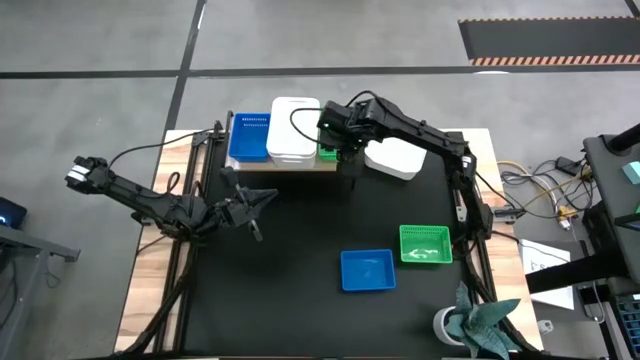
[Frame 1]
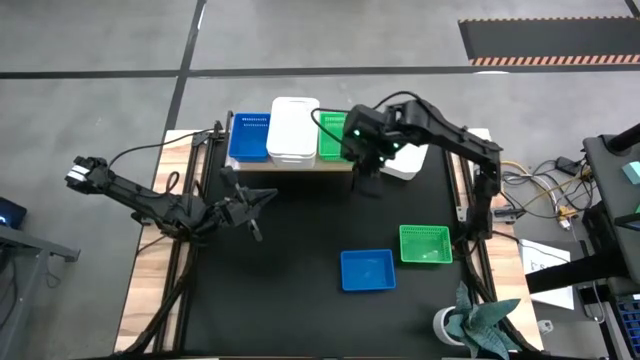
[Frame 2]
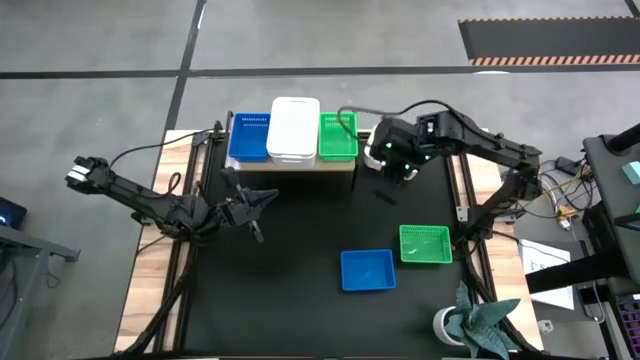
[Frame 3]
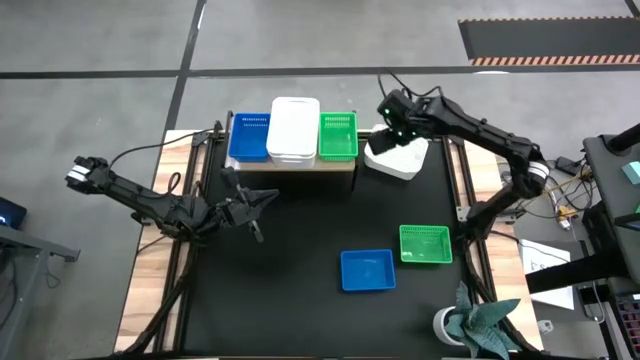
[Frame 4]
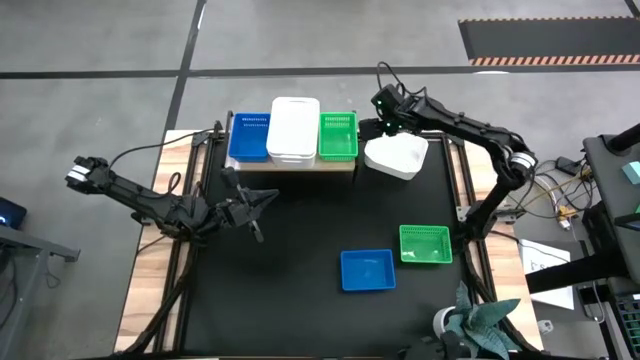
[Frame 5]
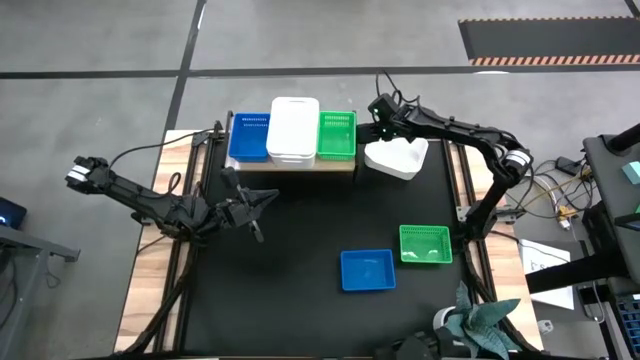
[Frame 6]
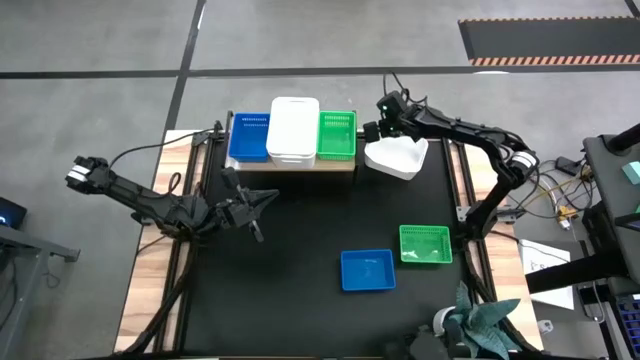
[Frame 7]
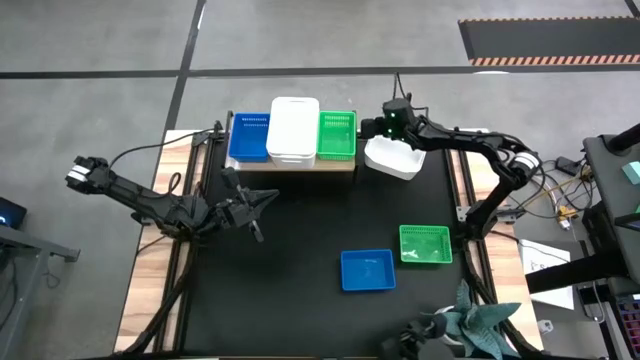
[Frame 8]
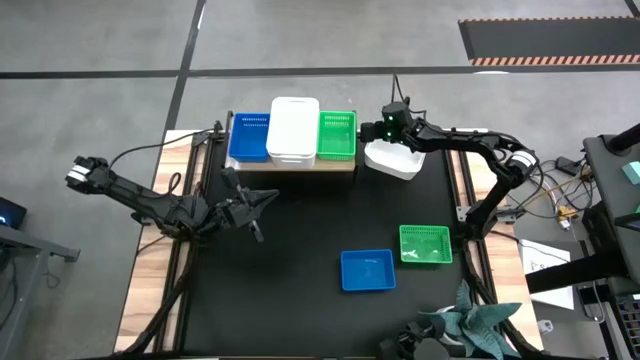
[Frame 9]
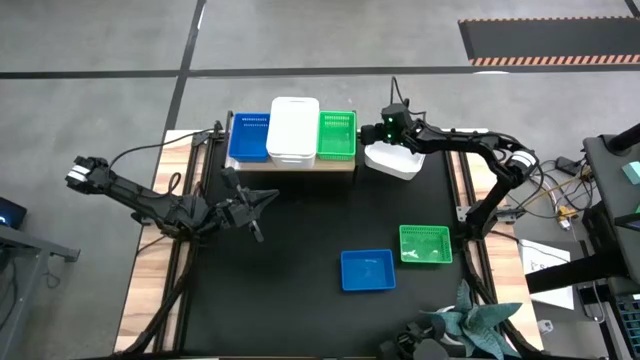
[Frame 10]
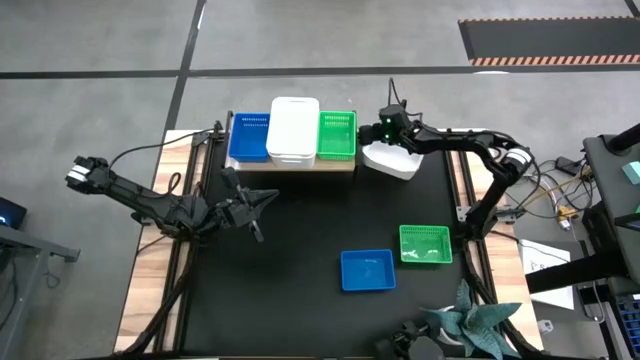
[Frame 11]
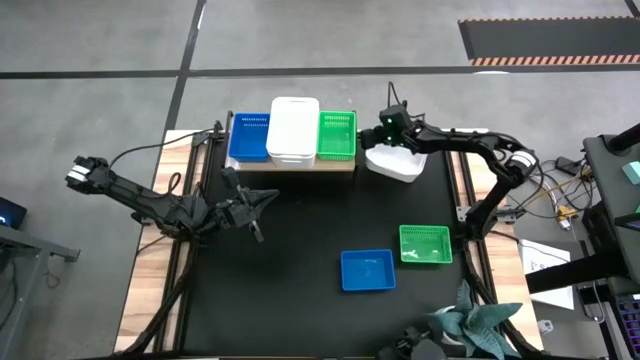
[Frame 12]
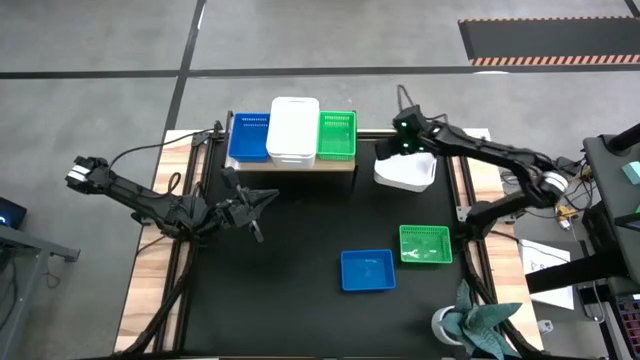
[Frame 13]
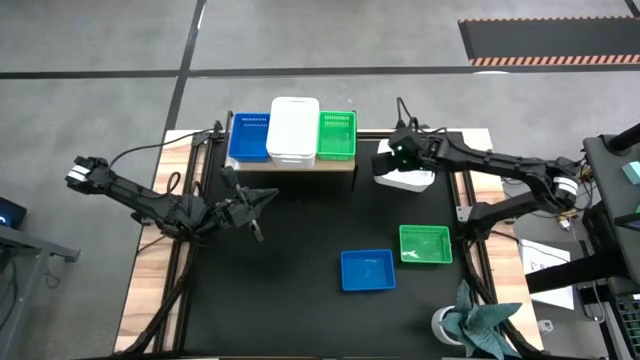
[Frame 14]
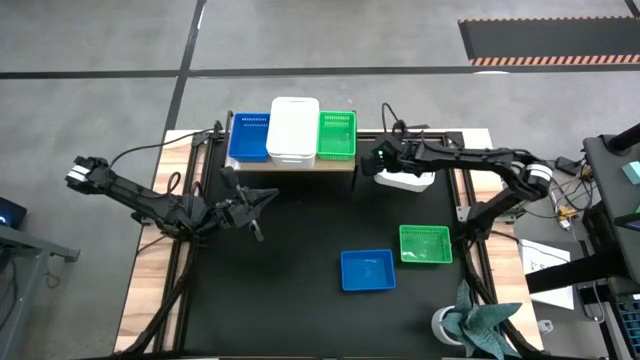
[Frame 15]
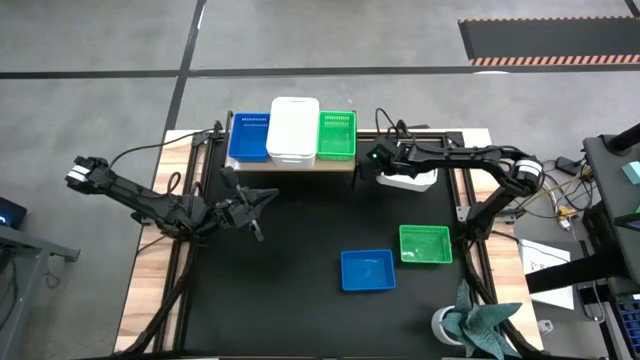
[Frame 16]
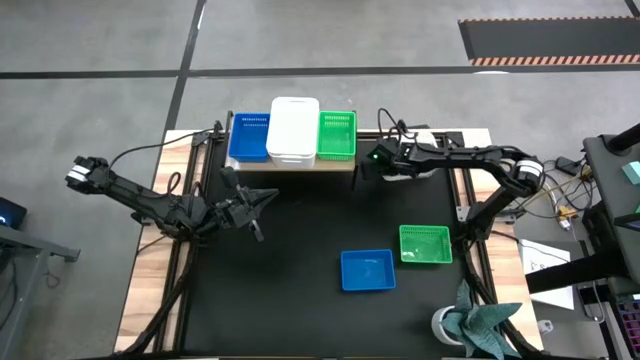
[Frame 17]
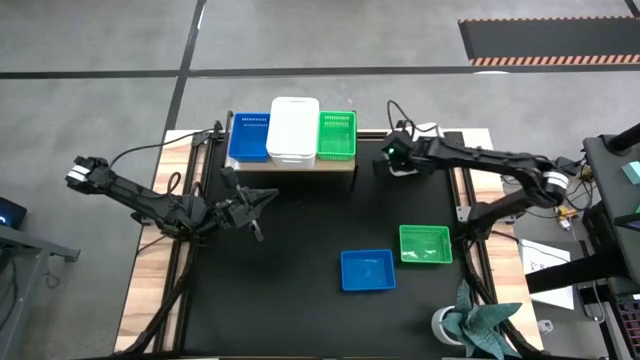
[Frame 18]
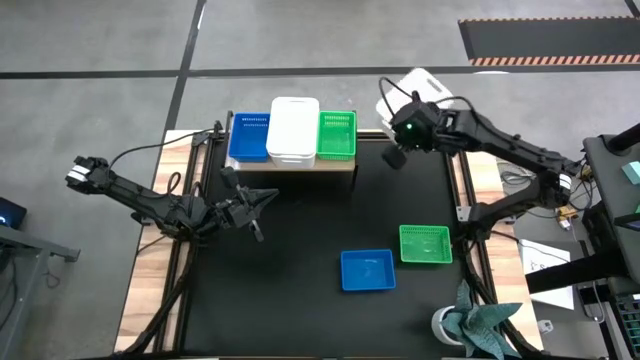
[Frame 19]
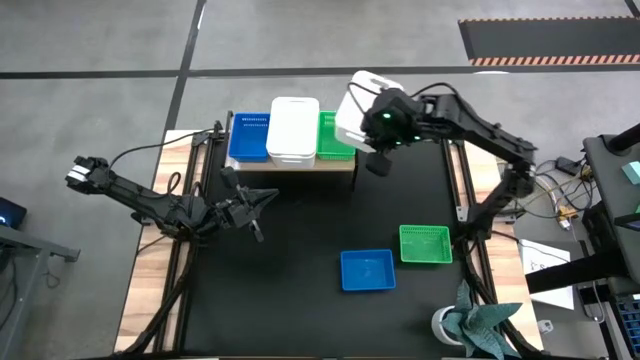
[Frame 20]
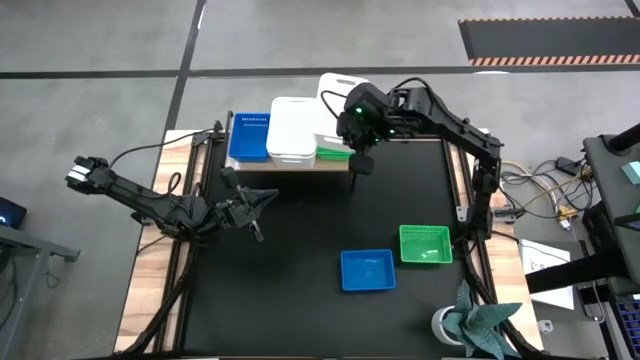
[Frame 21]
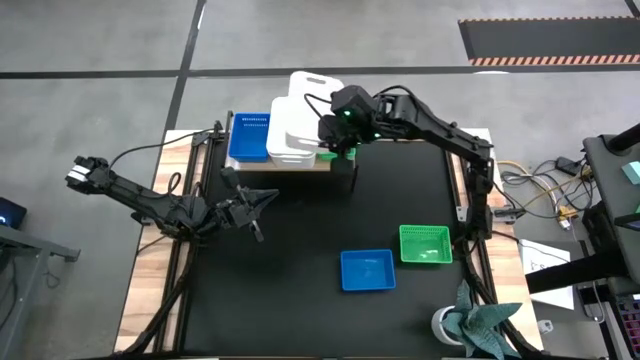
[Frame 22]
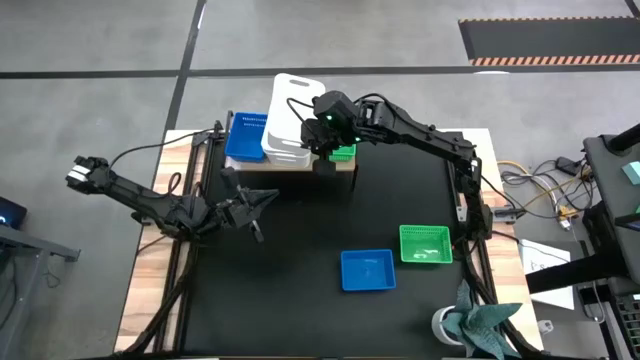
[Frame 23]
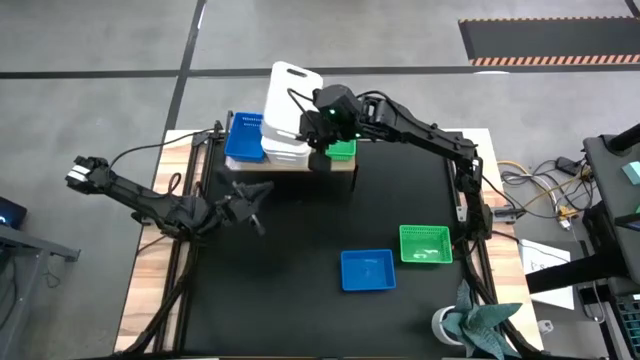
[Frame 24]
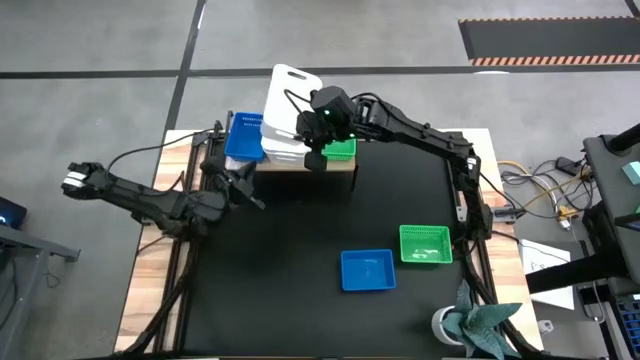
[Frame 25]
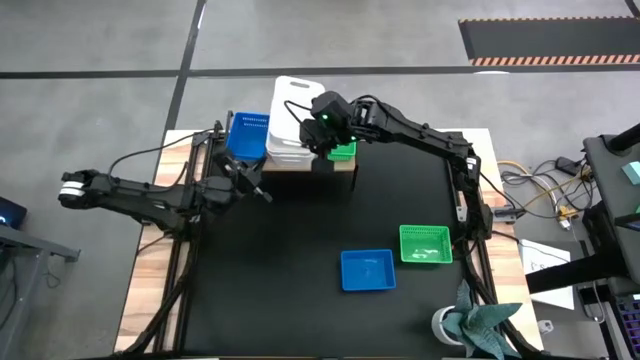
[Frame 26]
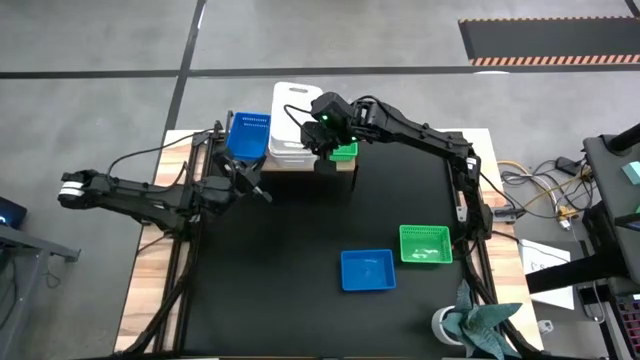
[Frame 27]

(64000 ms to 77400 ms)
Task: Stack baskets on shelf by color
Stack the white bin on top of the white bin on the shelf

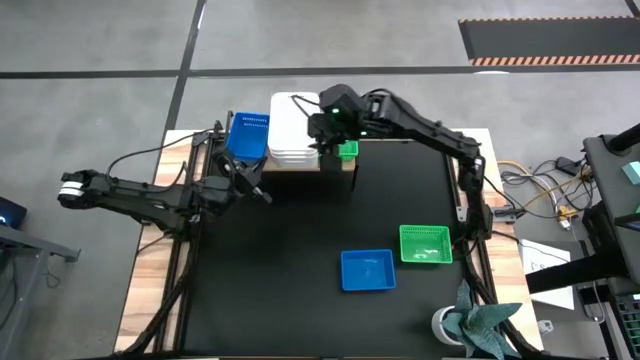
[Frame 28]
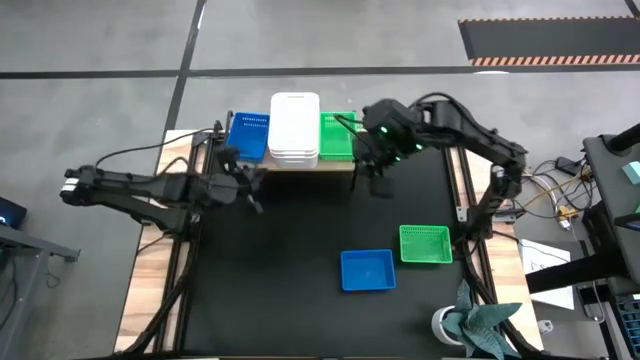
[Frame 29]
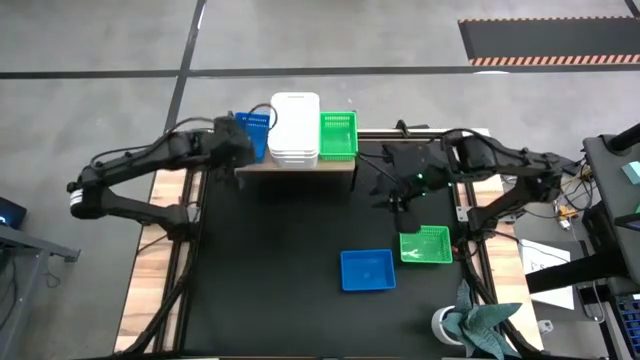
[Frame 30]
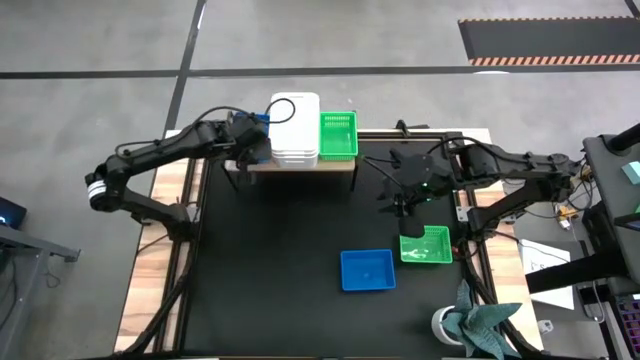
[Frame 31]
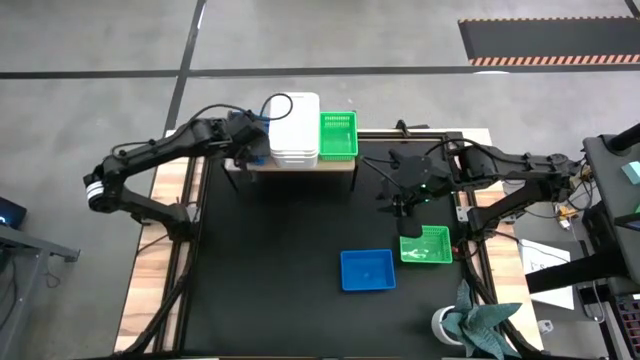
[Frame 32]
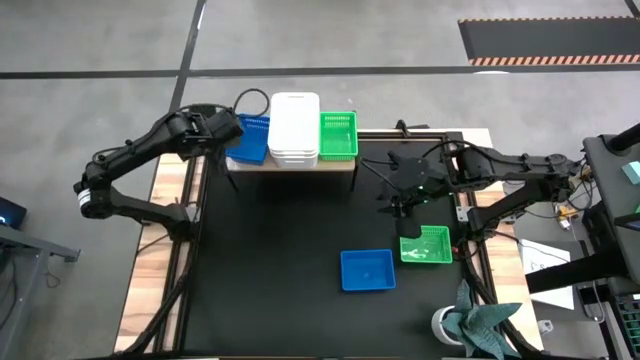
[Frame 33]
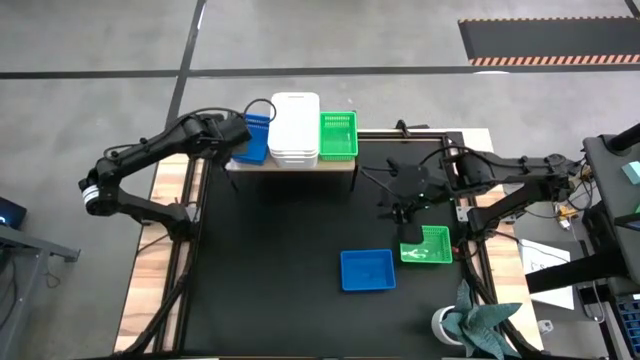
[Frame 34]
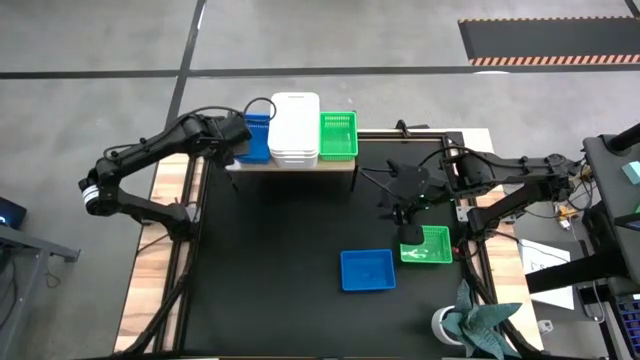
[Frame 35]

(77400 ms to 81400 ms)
Adjust the blue bins on the shelf

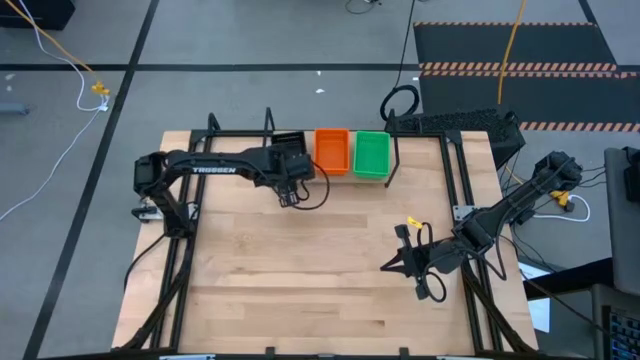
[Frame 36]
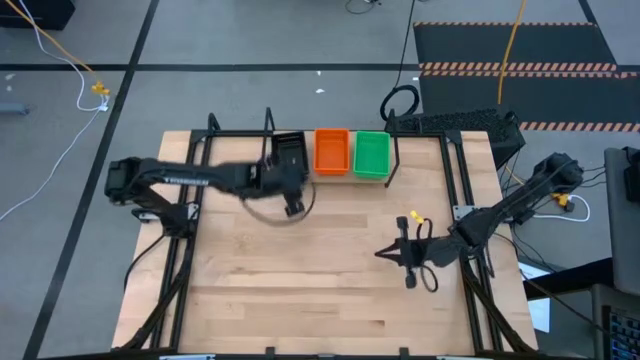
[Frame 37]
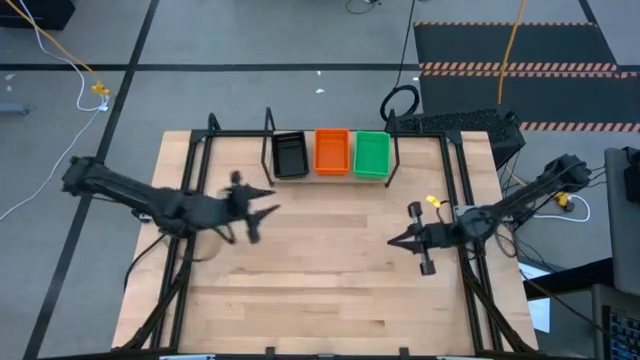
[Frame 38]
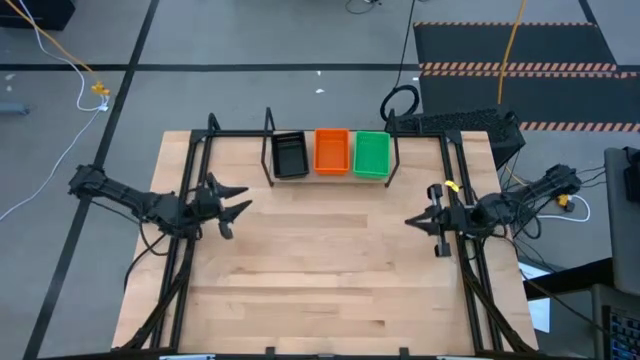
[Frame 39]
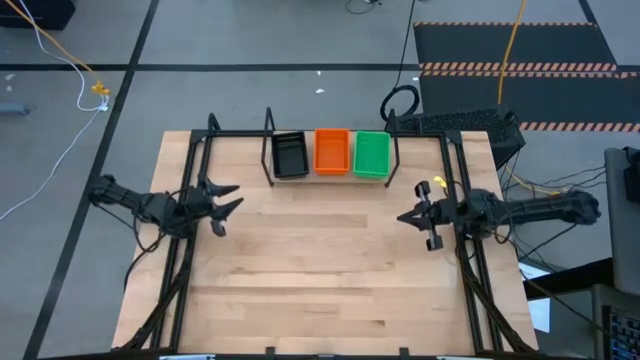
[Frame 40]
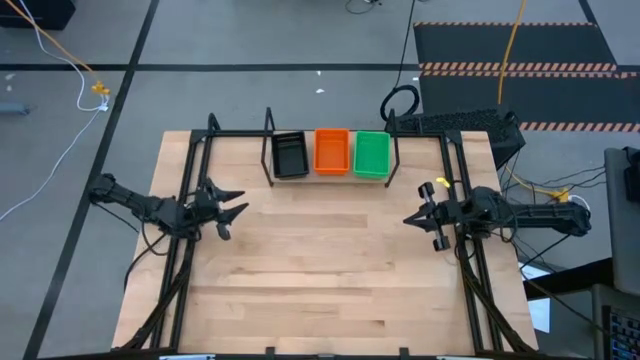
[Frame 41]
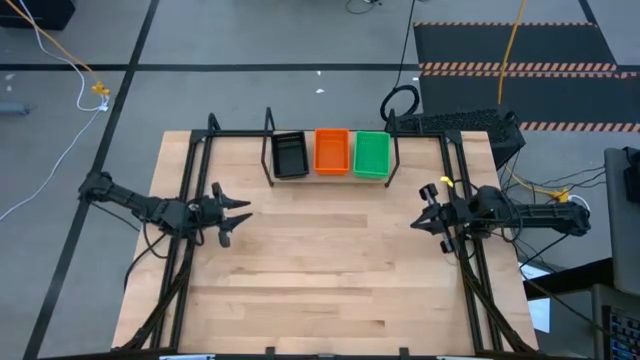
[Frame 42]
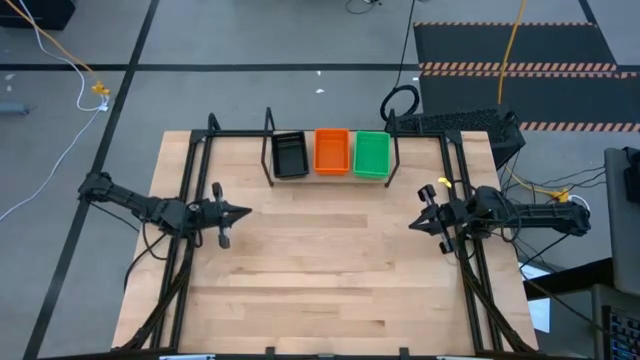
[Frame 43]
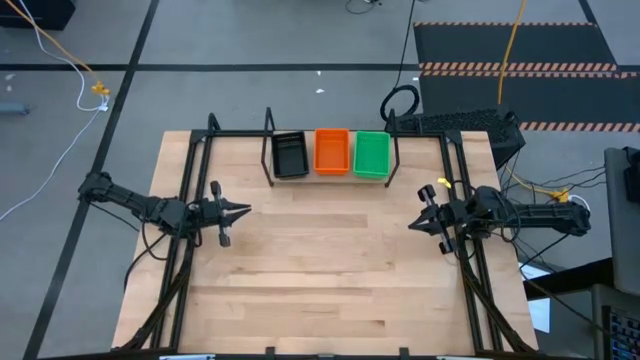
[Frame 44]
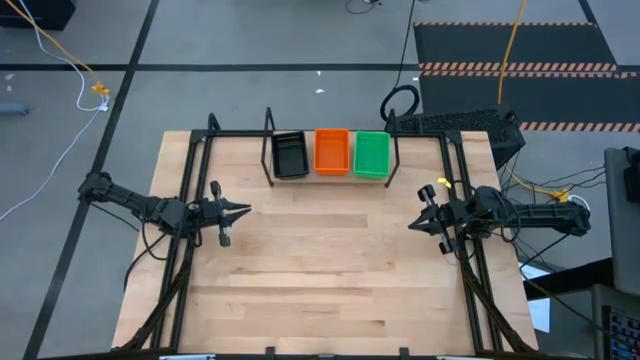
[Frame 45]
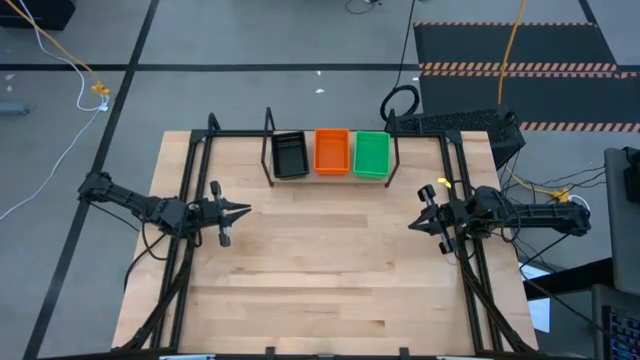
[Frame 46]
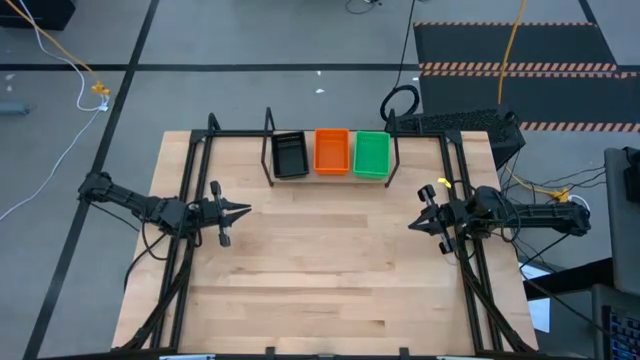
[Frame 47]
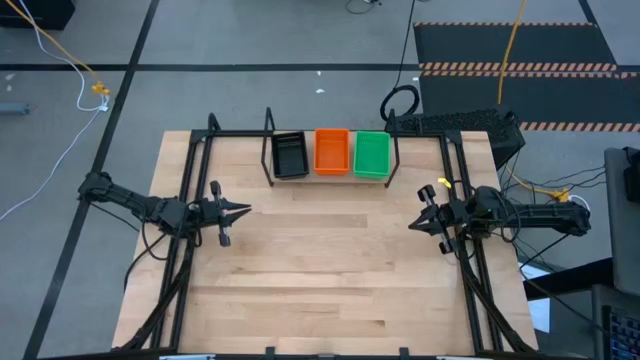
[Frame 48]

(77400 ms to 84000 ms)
Task: Stack baskets on shelf by color
Return to Home Position
